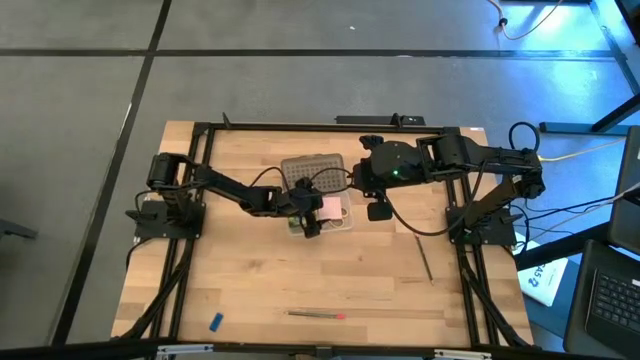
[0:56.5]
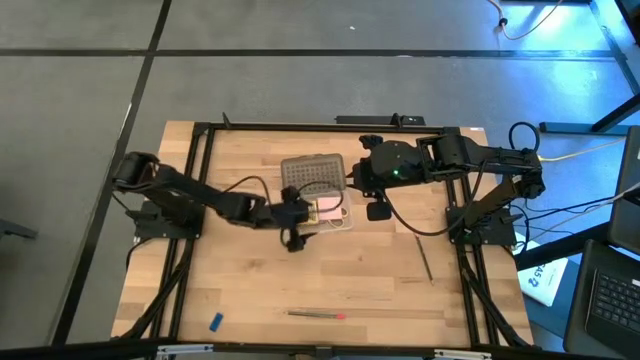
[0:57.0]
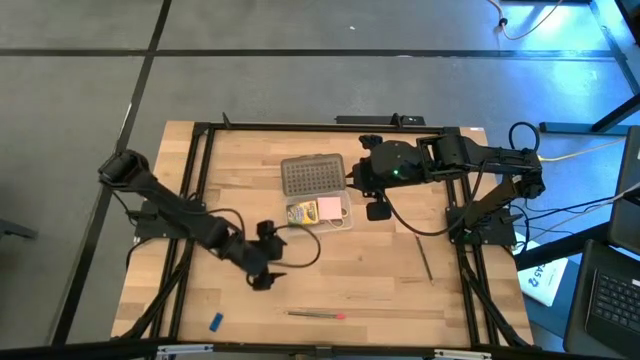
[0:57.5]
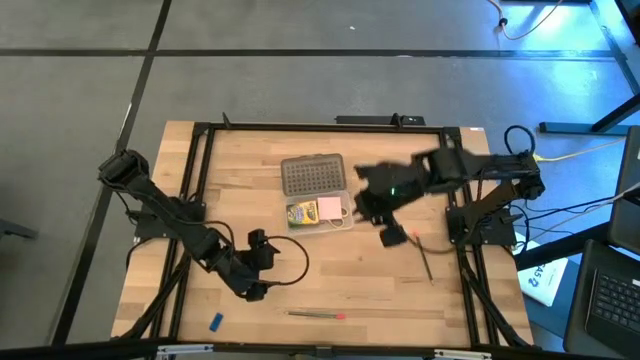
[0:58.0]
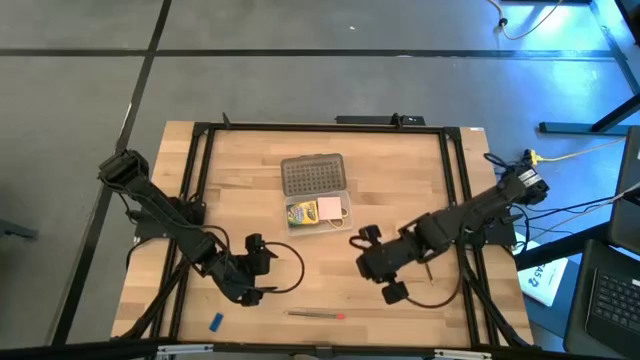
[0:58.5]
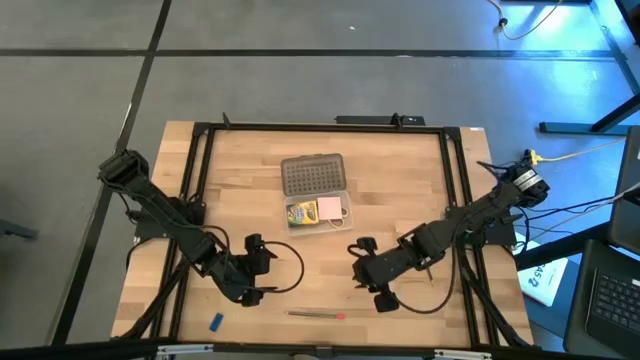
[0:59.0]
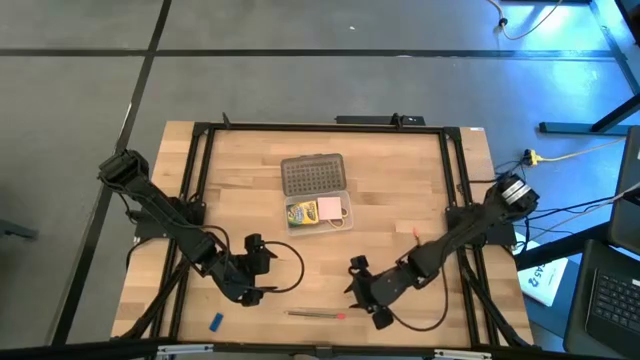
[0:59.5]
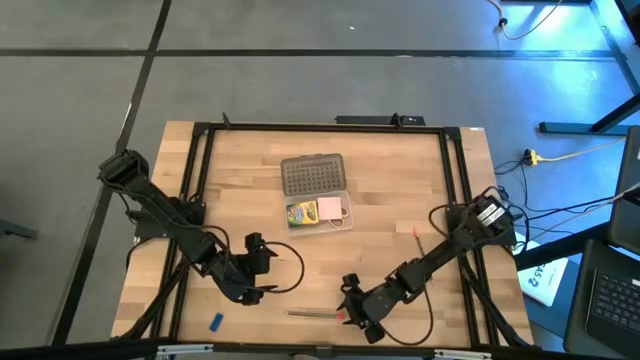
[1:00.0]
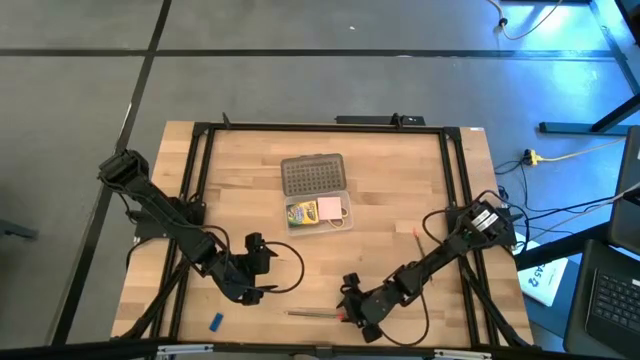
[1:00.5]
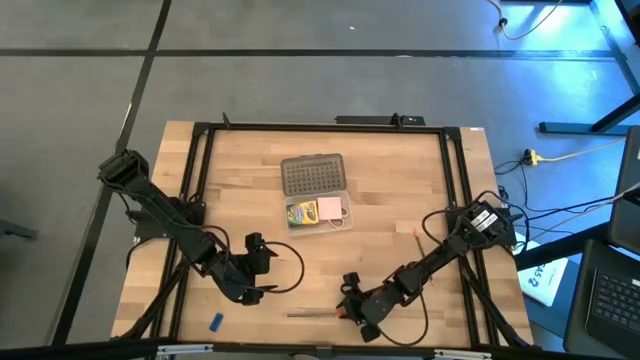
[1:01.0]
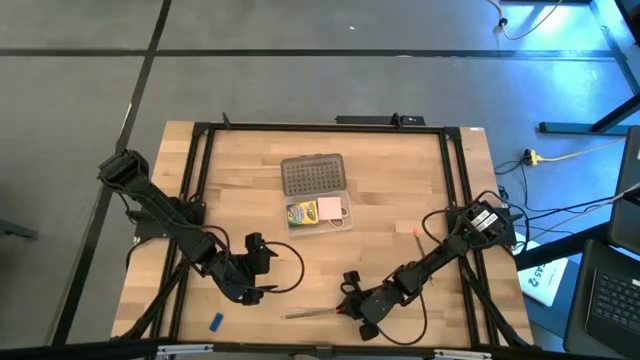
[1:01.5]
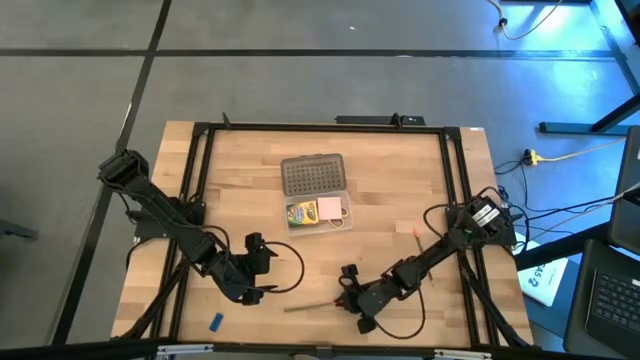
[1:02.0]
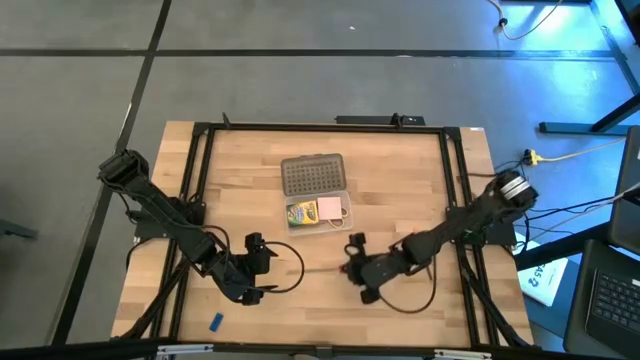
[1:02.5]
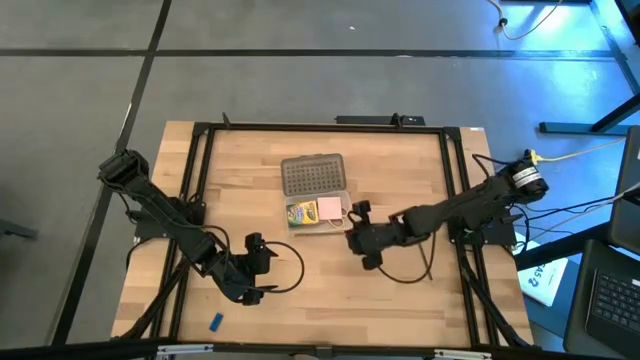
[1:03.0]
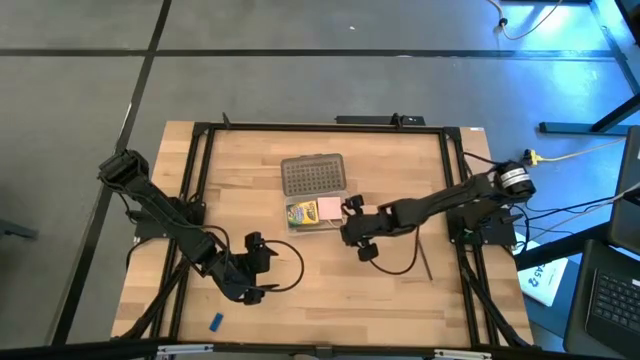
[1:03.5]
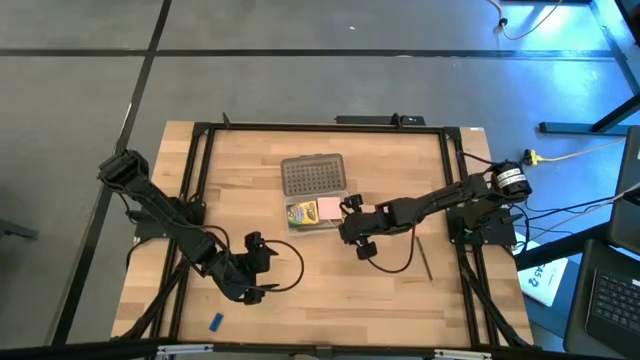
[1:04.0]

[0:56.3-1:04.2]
Task: Pack school essentials
Put the bottom black pencil into the black supply box

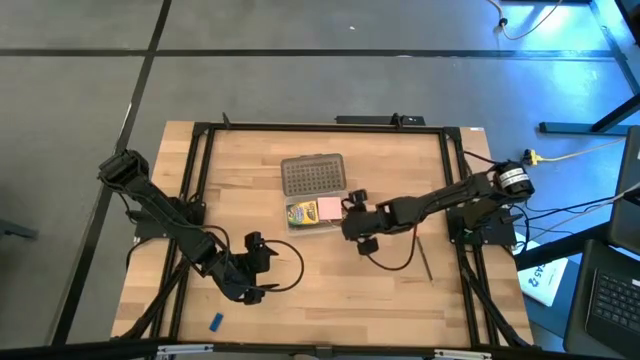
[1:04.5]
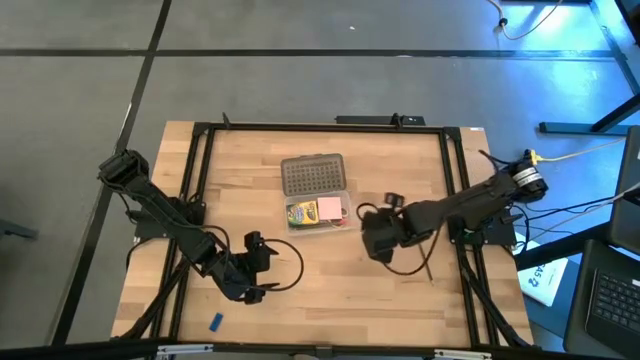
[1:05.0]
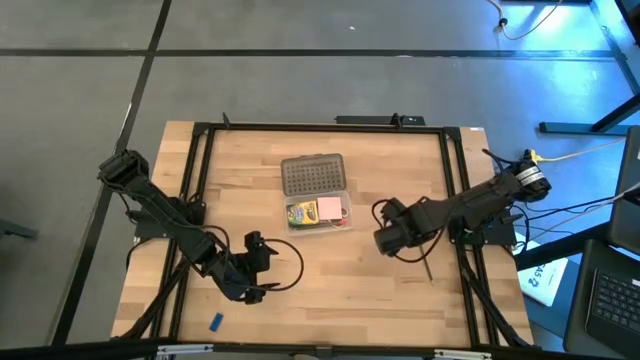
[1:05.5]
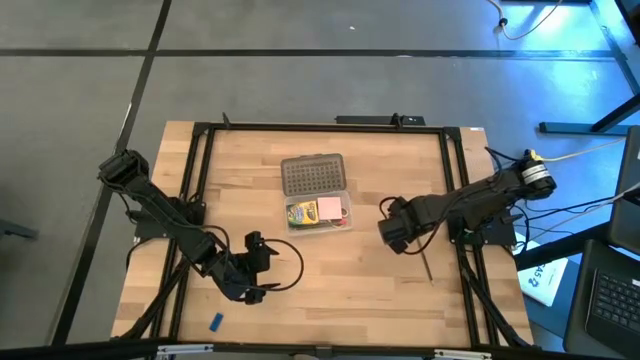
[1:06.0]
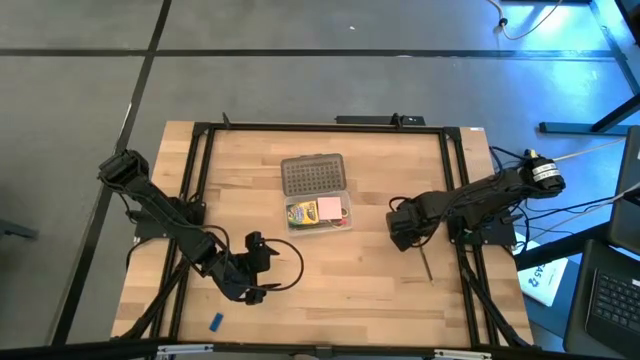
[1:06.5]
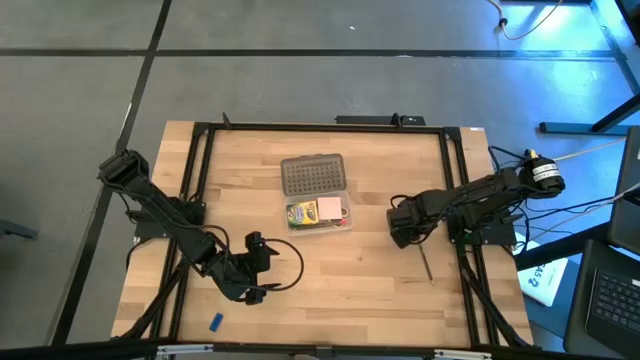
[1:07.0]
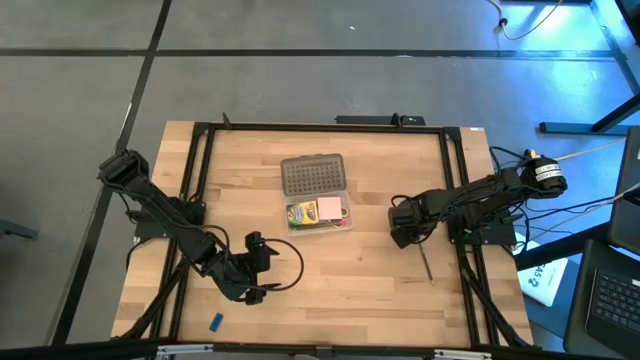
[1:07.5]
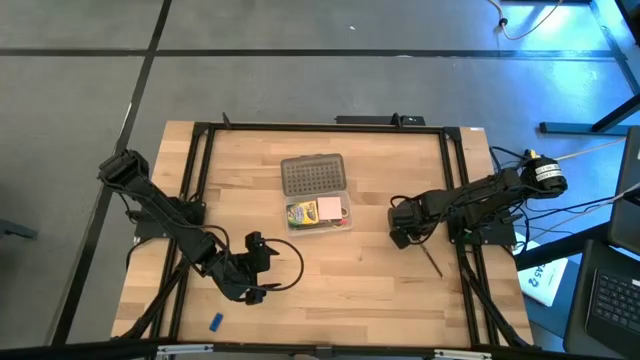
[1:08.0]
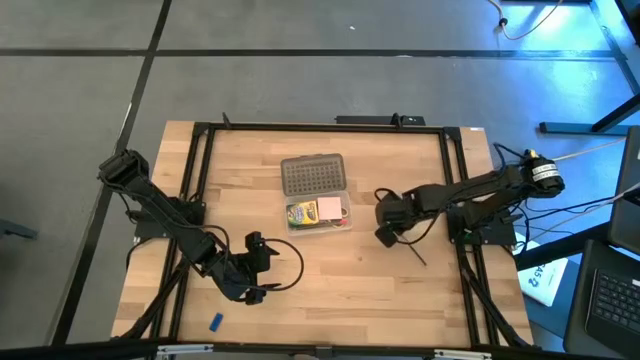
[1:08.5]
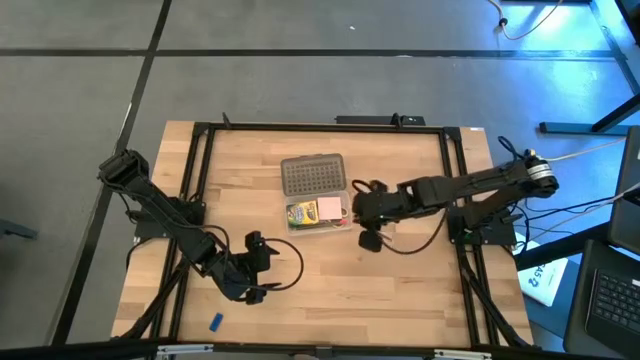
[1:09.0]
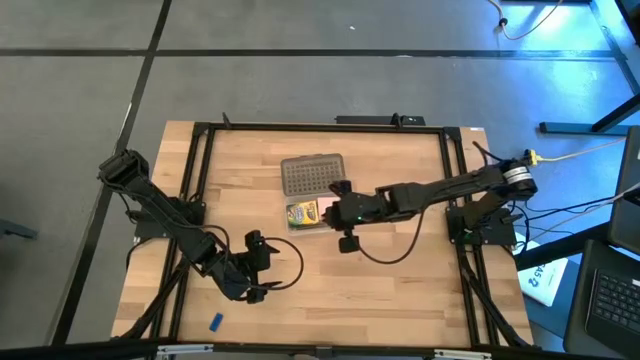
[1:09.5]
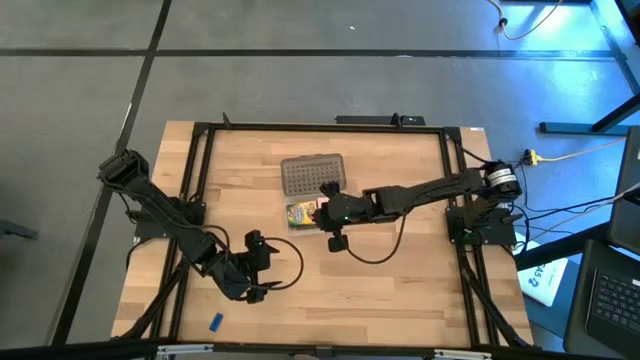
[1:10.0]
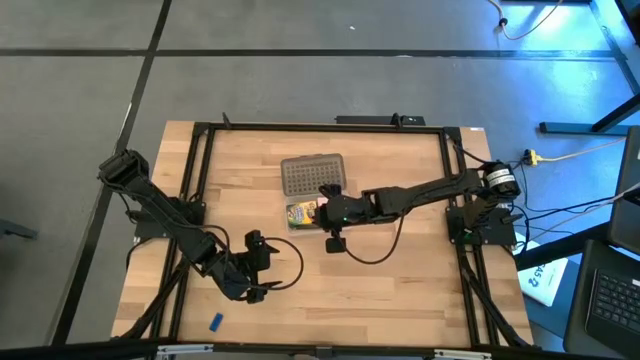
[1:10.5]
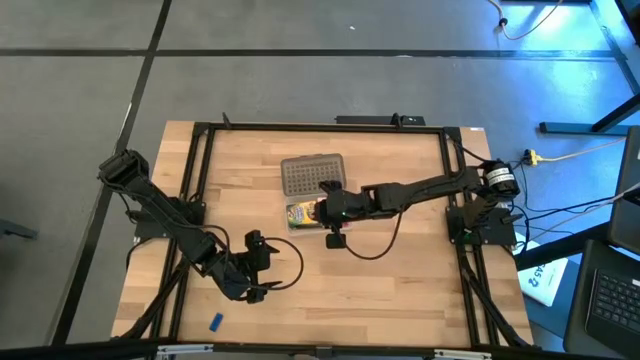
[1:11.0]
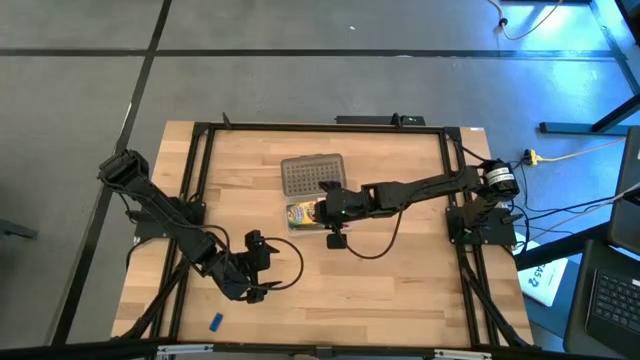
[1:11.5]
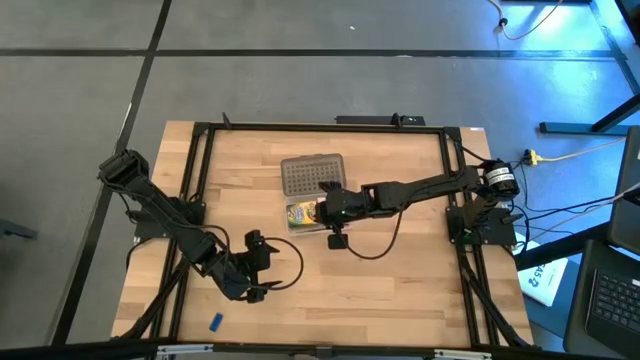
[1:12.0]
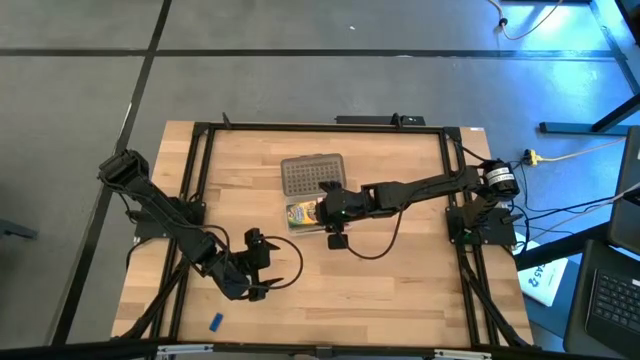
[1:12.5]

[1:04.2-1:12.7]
Put the black pencil into the black supply box
